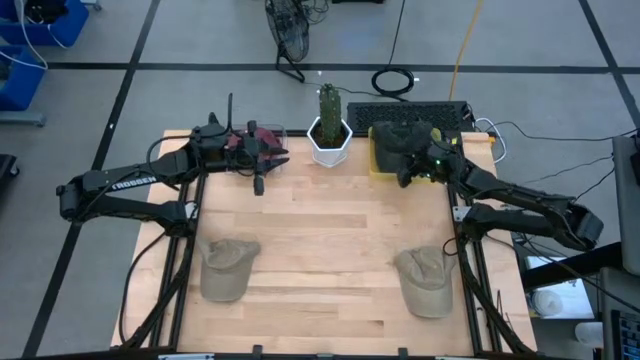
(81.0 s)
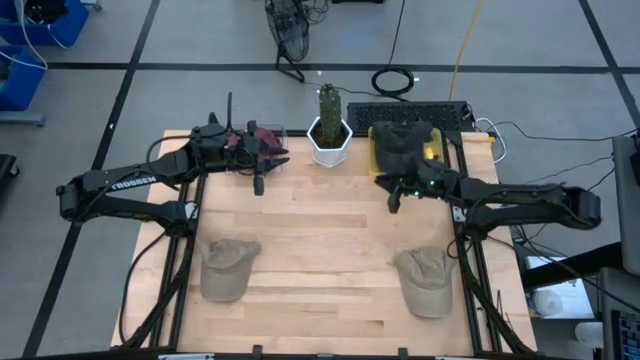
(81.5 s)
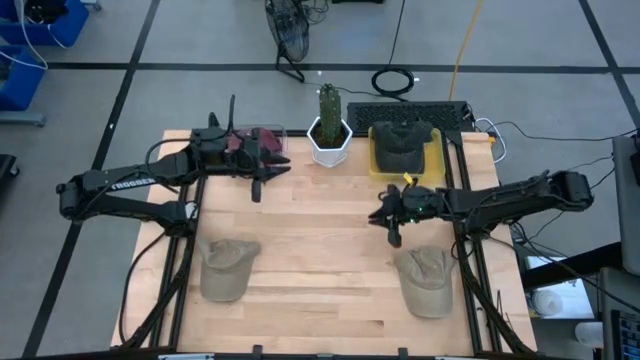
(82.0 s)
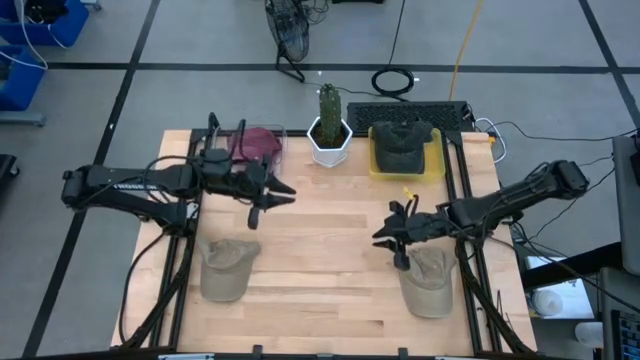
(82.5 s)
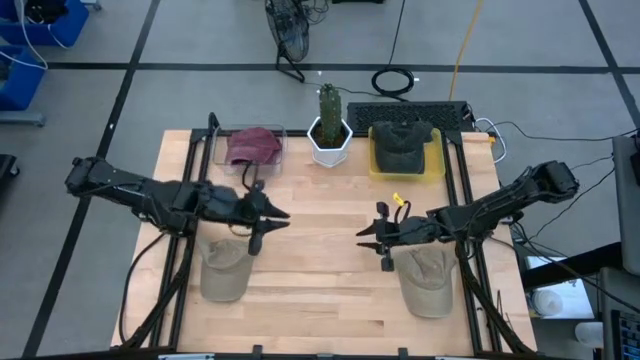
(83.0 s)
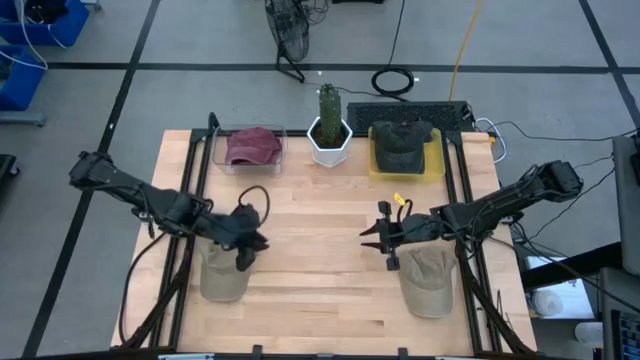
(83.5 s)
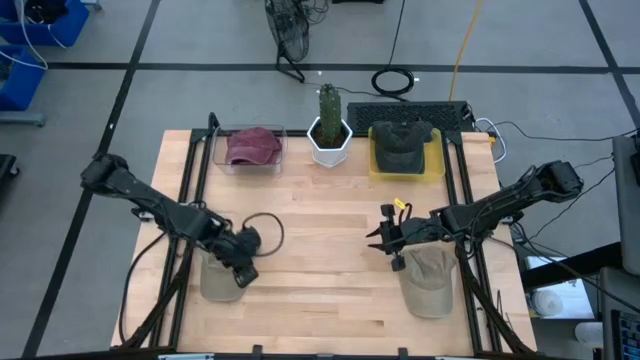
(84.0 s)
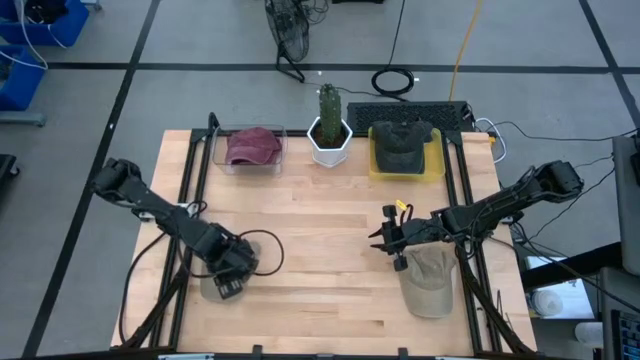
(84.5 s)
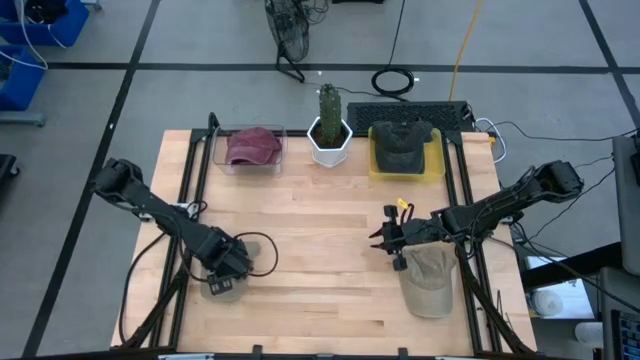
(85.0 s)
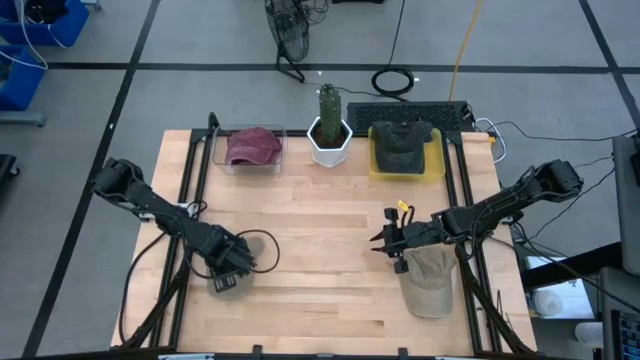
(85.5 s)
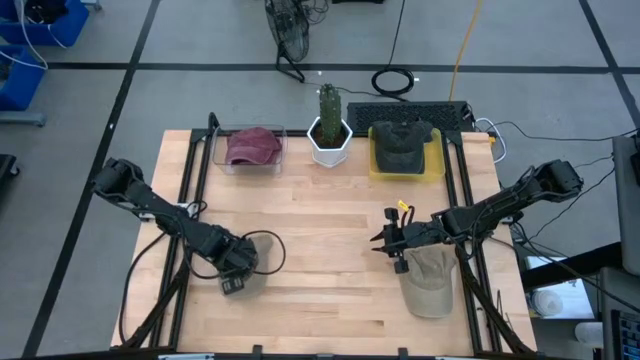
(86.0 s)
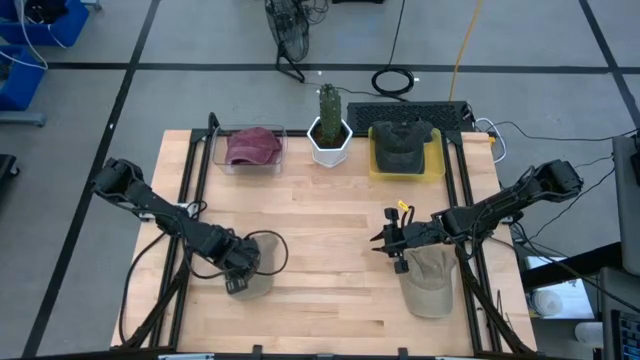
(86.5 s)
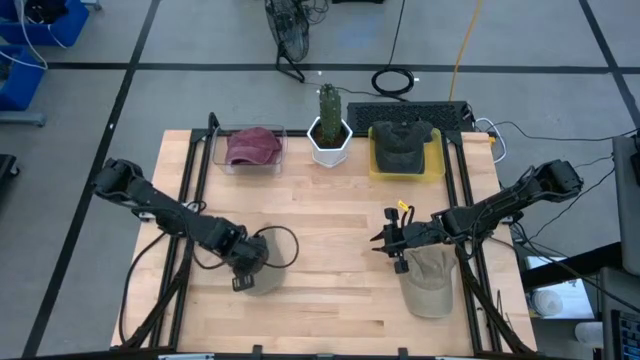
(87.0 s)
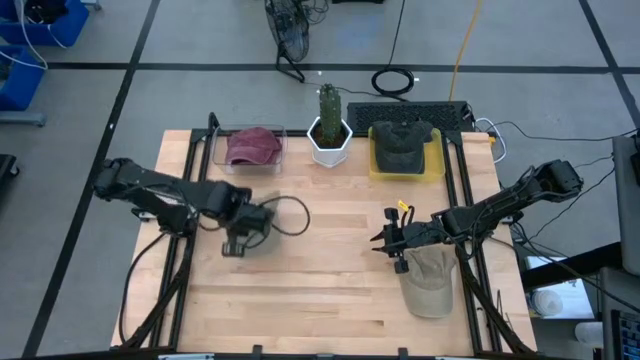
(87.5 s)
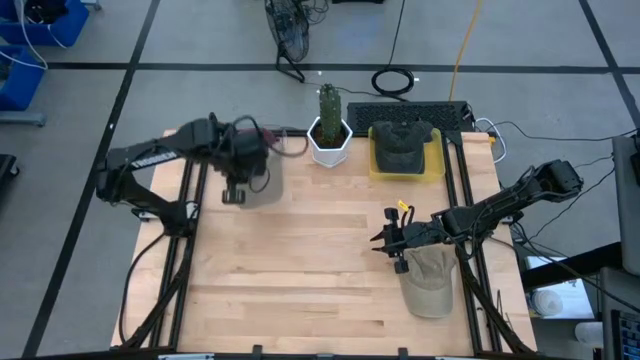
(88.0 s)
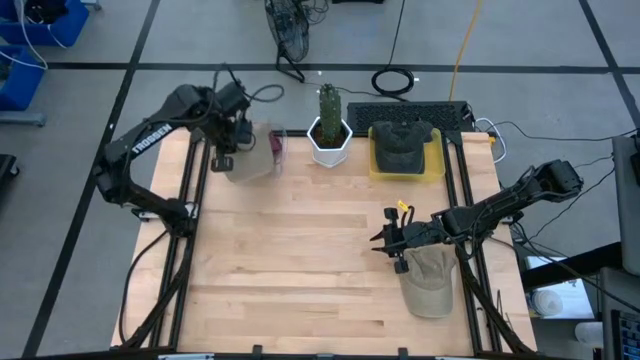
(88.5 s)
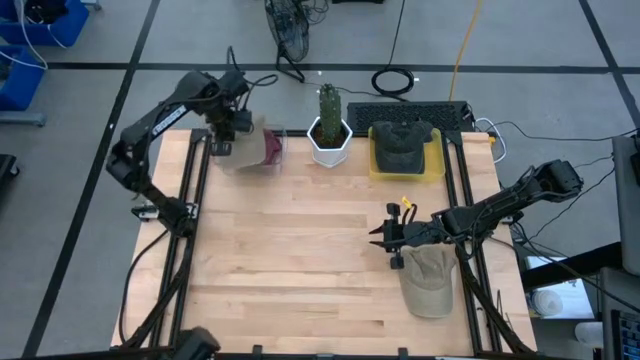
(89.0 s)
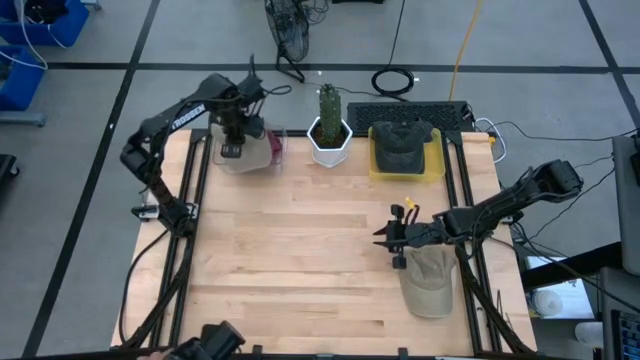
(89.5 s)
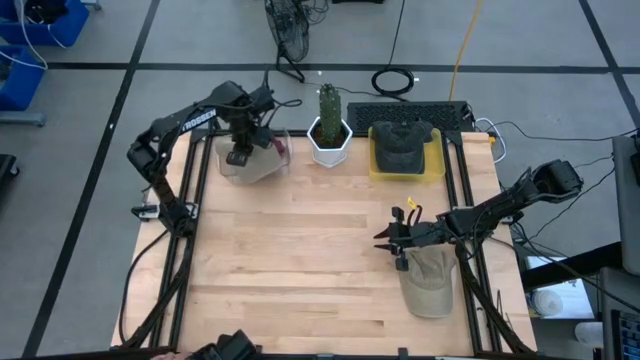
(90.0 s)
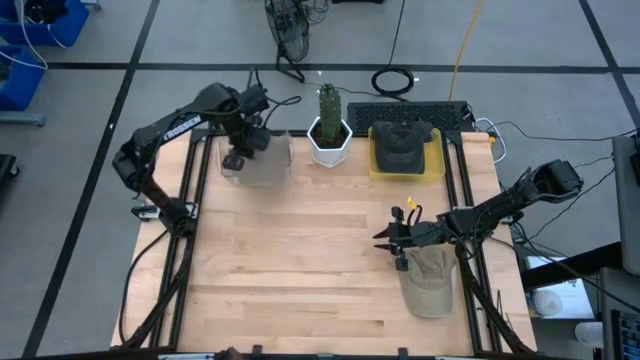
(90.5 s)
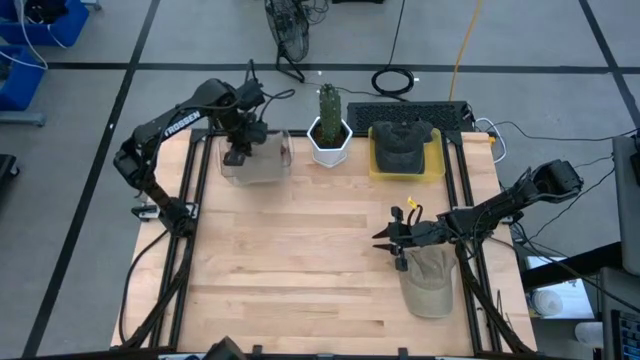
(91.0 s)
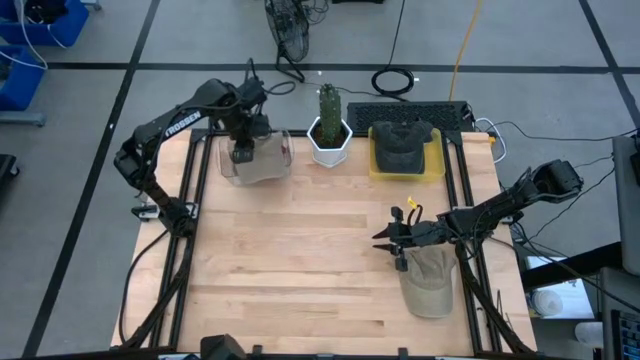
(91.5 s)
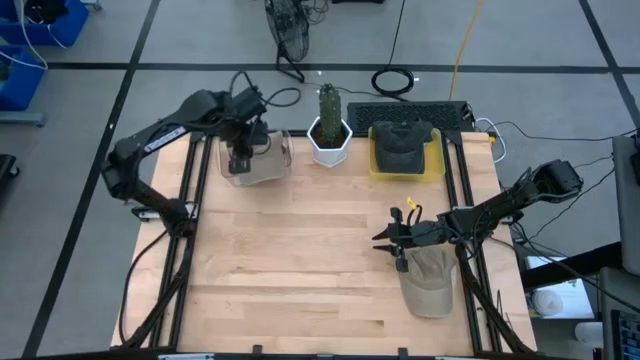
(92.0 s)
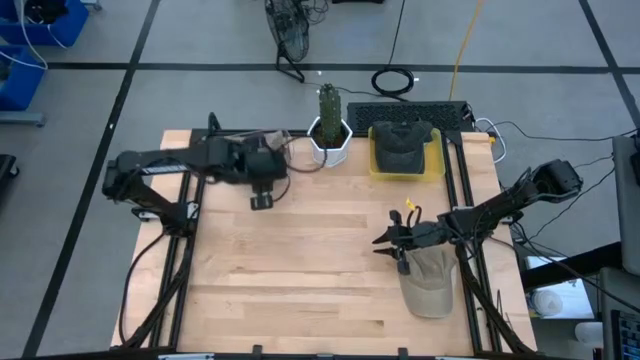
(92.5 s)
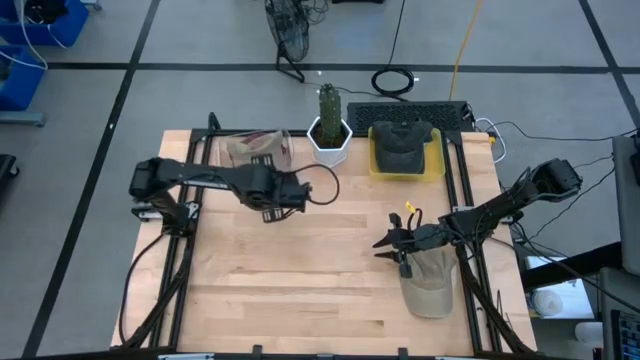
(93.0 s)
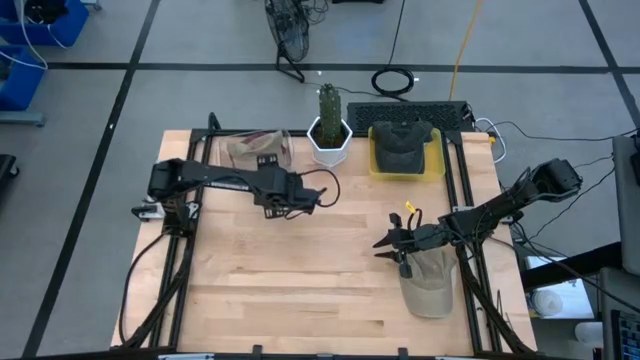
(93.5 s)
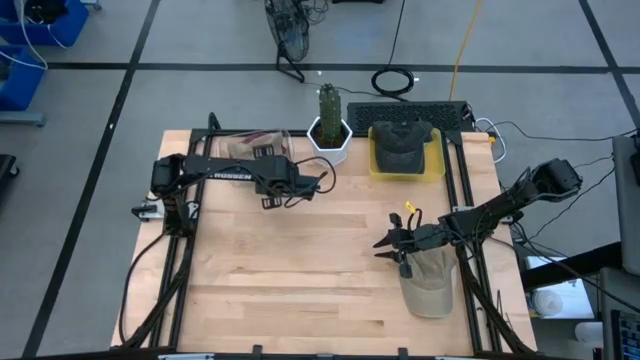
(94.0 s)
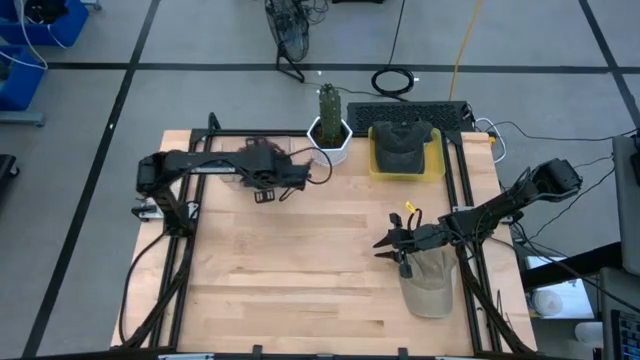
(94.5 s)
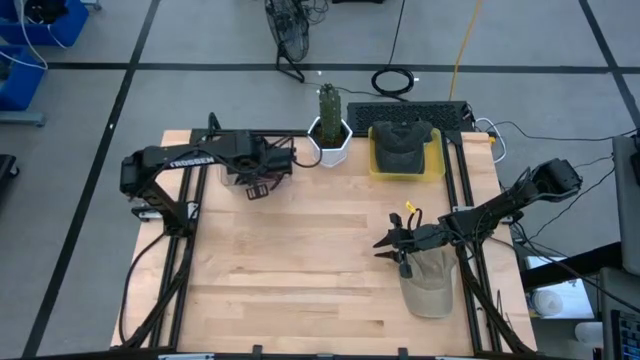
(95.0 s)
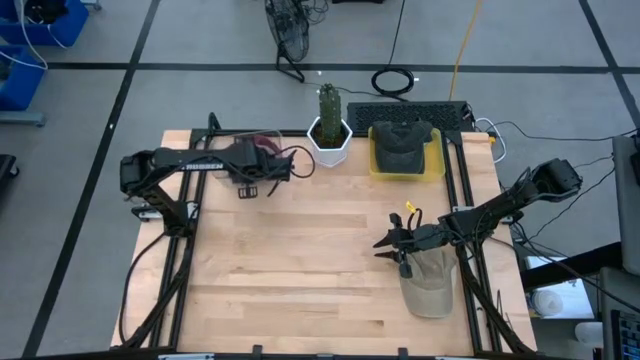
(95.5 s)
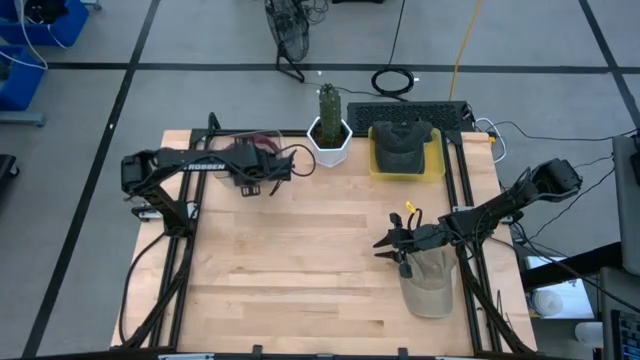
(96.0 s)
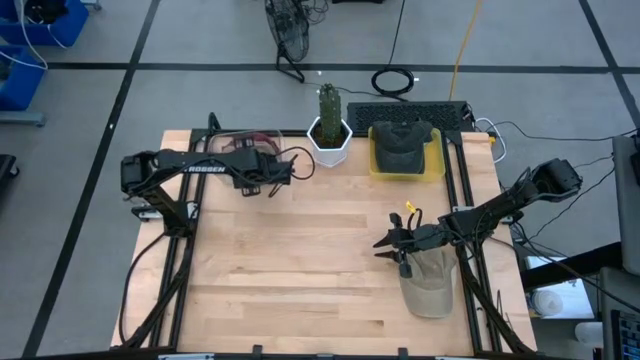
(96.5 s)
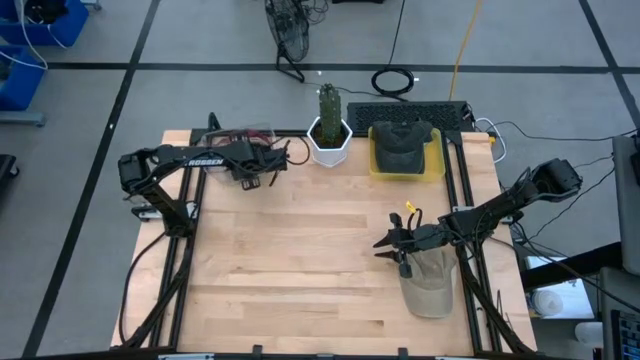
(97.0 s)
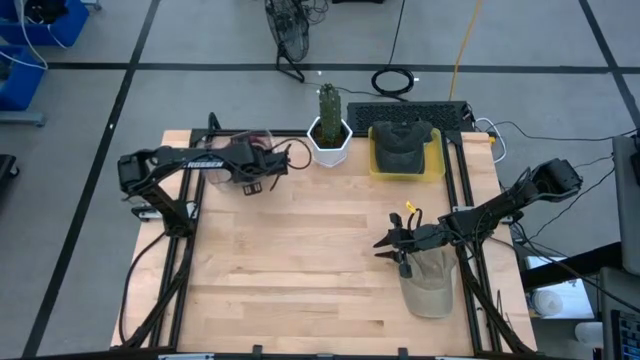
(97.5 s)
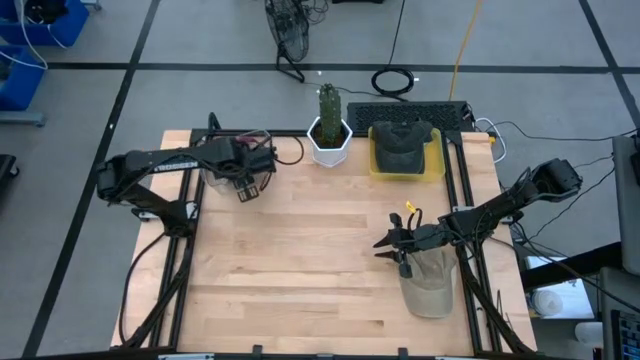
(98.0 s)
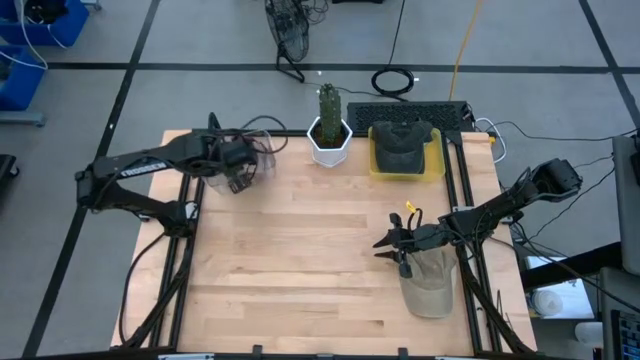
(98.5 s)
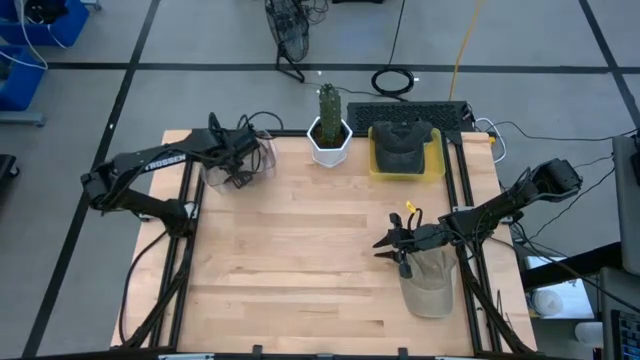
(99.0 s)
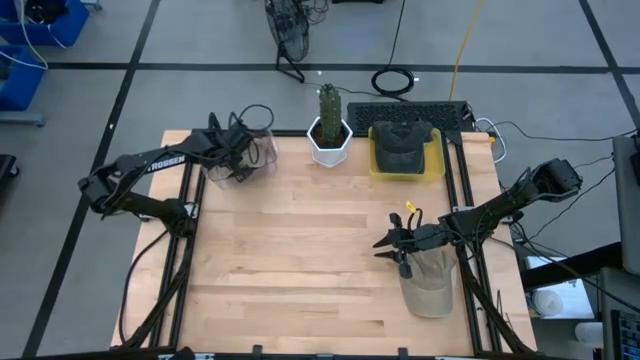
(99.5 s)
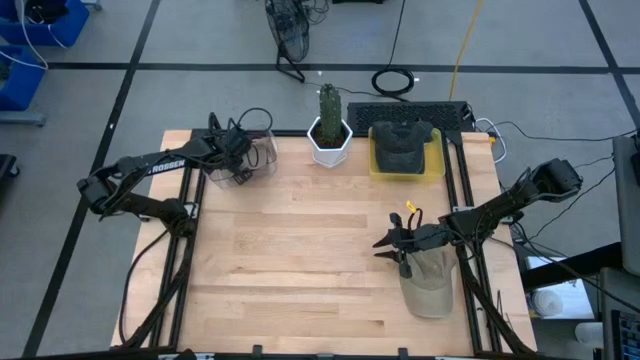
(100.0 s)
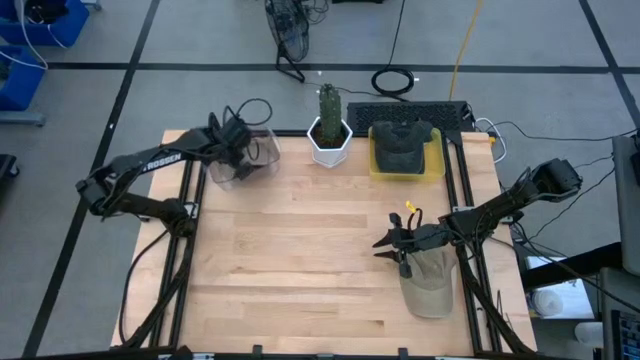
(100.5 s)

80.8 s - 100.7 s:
Task: Pick & Place hat
Put the left brown cap into the transparent bin

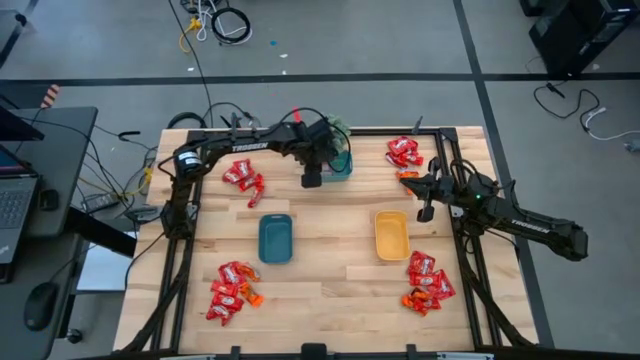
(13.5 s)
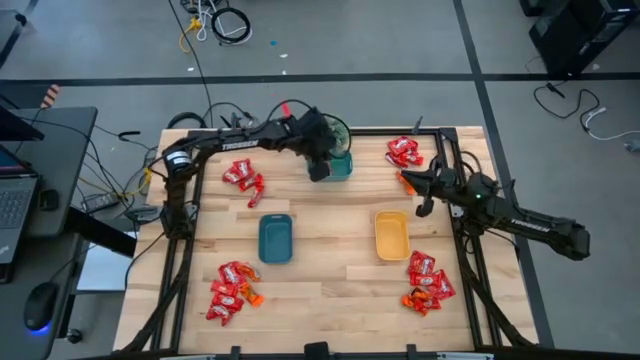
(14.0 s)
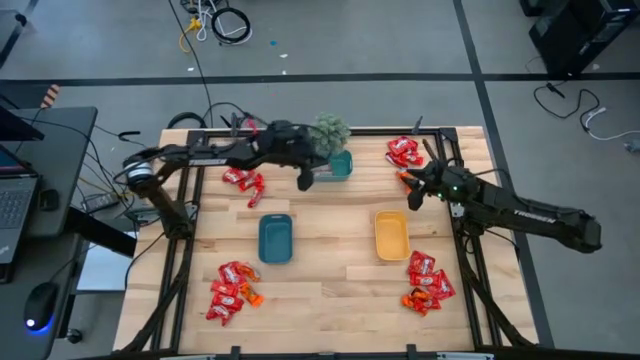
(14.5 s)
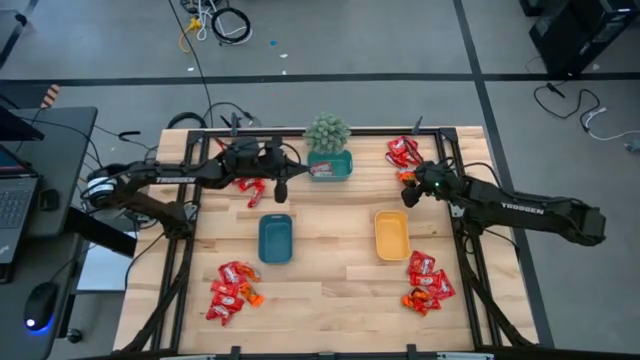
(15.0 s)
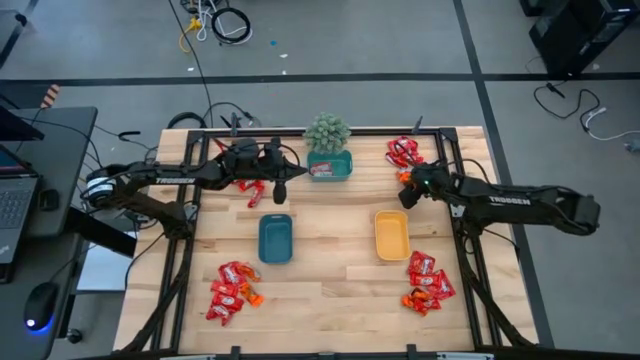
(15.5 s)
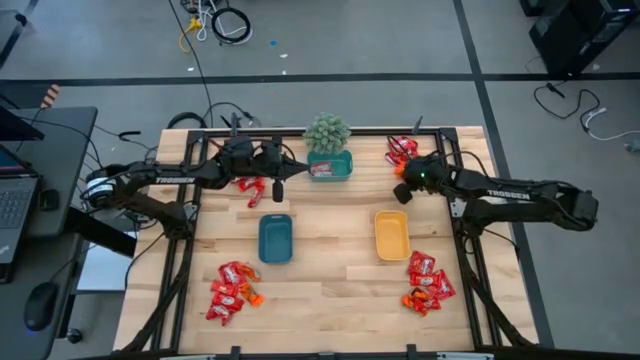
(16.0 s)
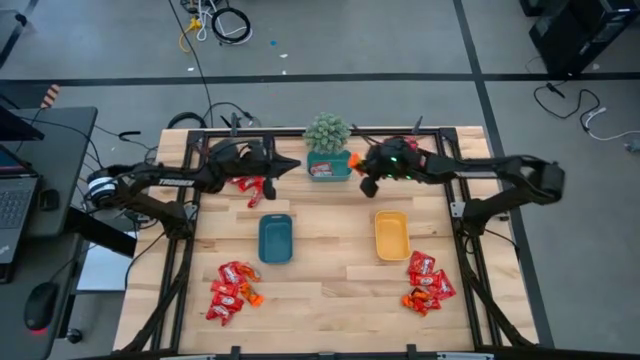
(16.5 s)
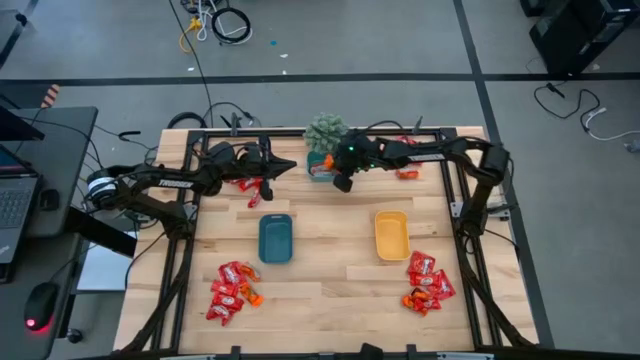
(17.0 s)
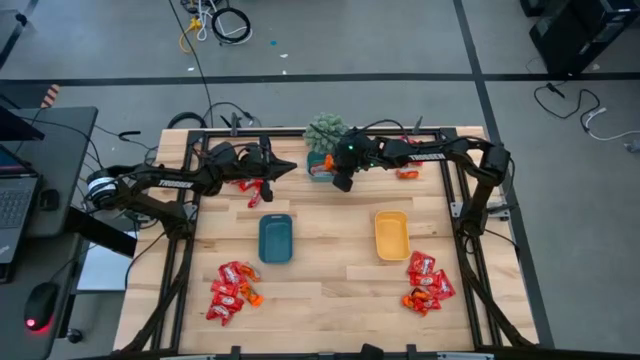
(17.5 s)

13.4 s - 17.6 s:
Task: Sort candy
Put the orange chocolate into the green bin
